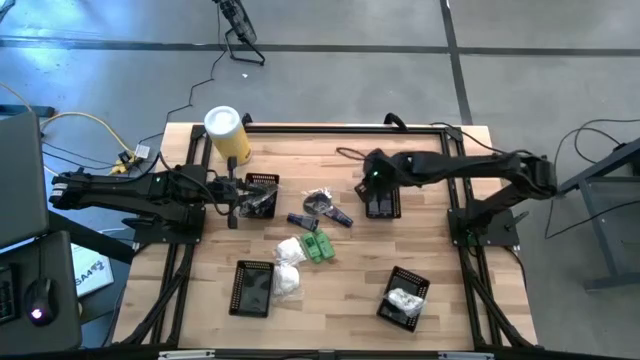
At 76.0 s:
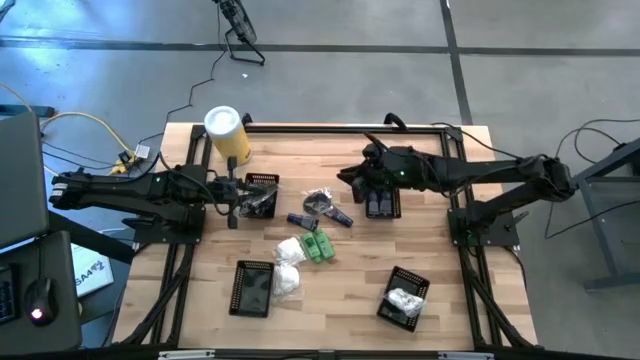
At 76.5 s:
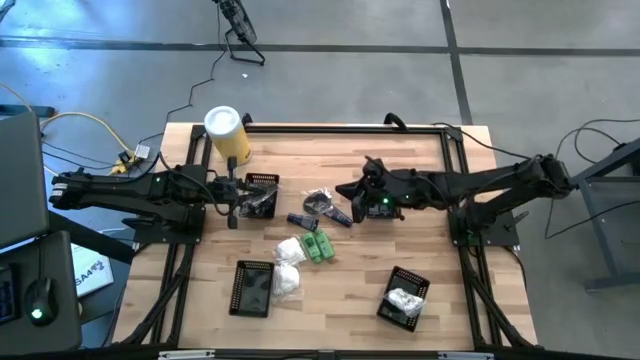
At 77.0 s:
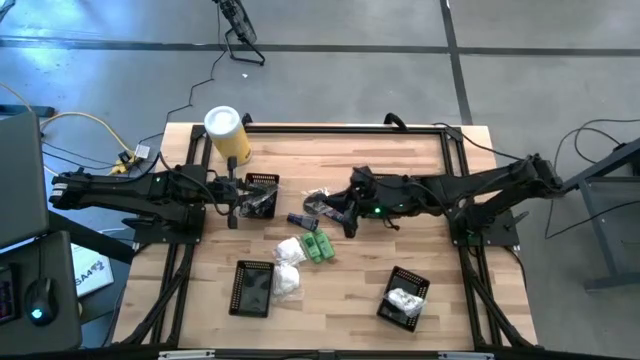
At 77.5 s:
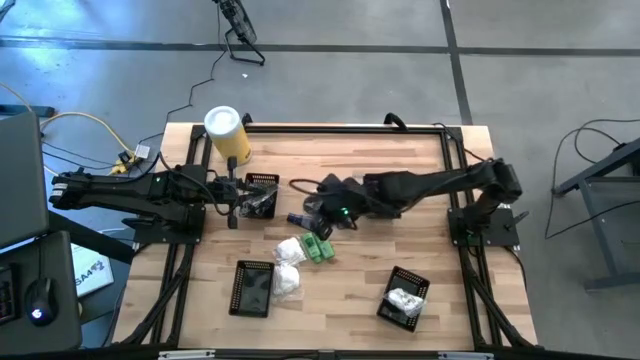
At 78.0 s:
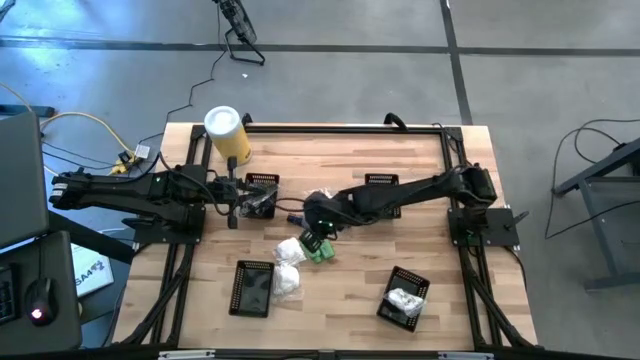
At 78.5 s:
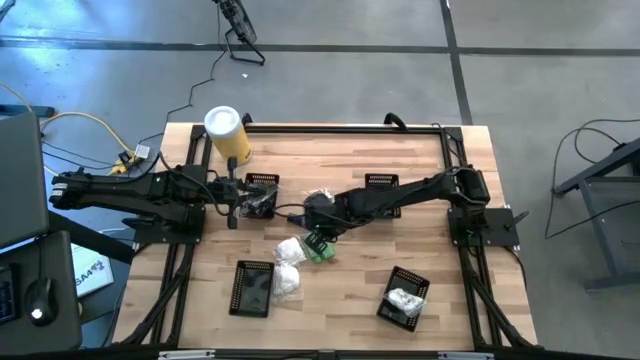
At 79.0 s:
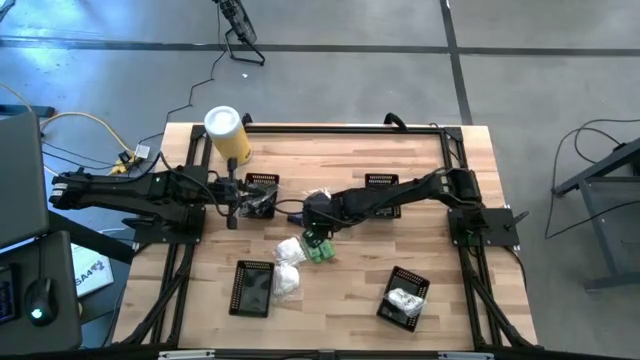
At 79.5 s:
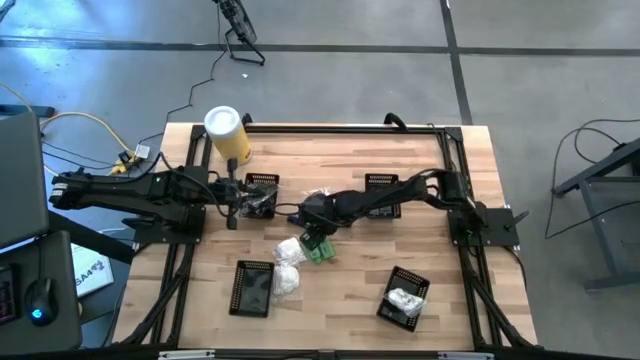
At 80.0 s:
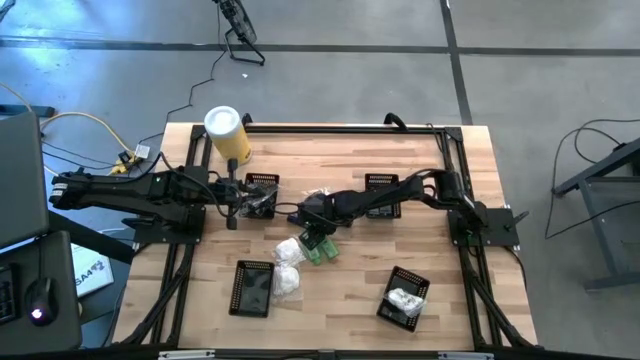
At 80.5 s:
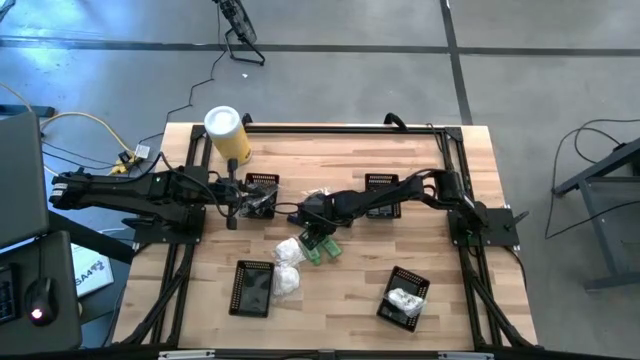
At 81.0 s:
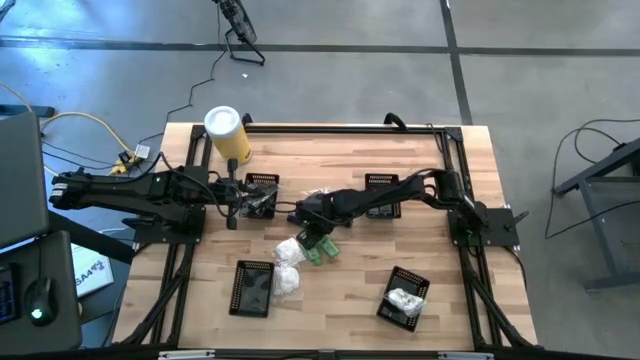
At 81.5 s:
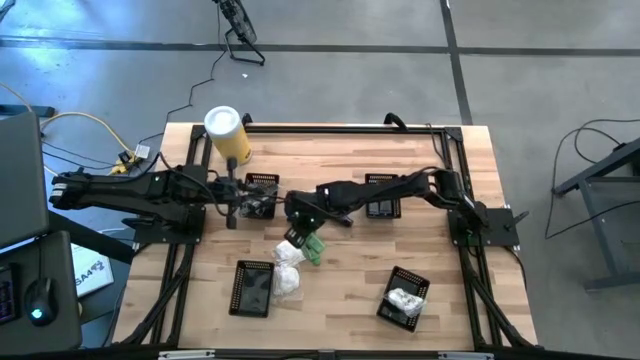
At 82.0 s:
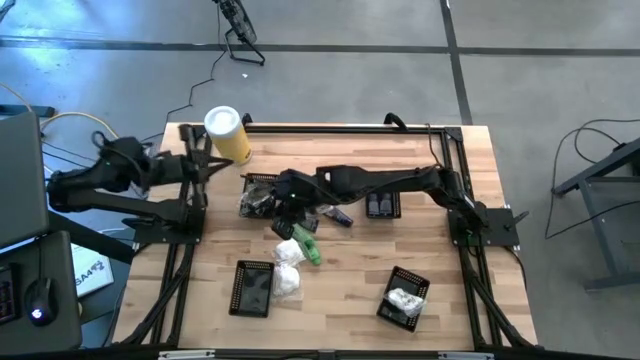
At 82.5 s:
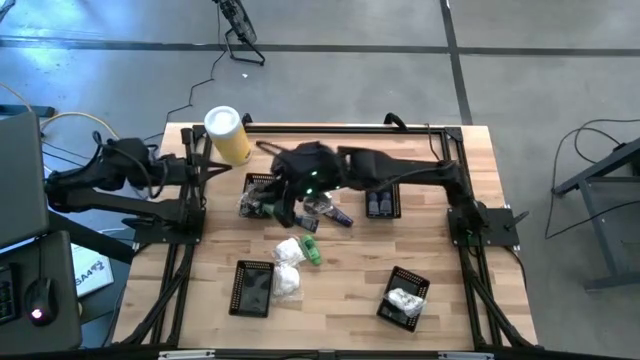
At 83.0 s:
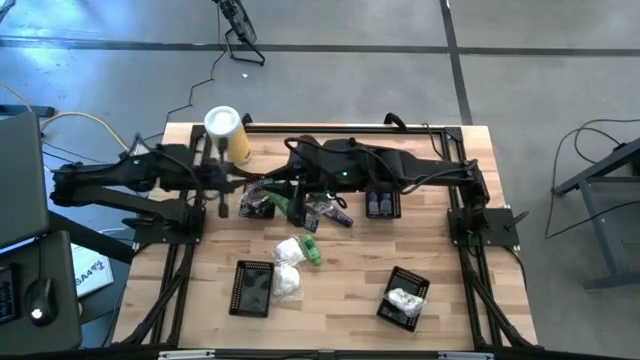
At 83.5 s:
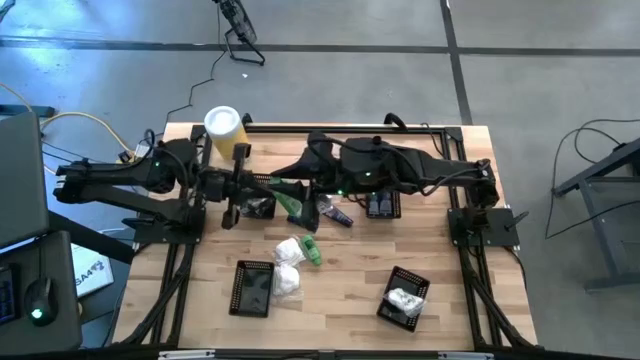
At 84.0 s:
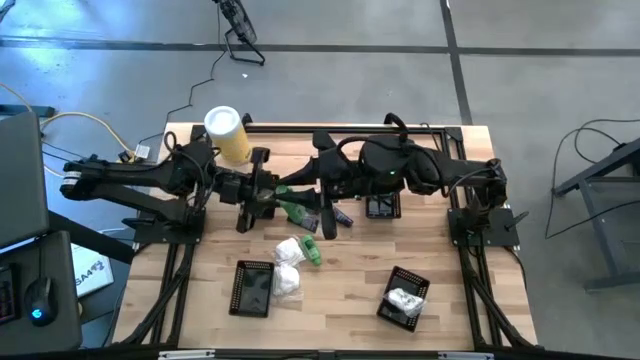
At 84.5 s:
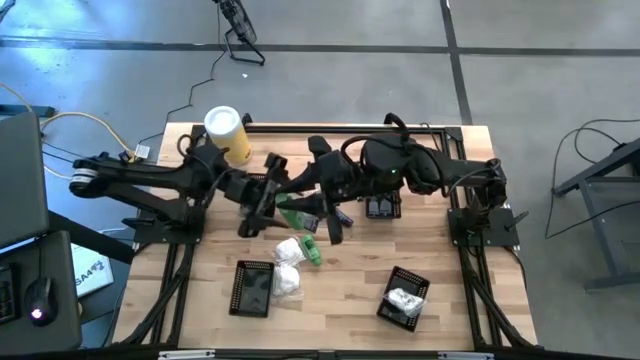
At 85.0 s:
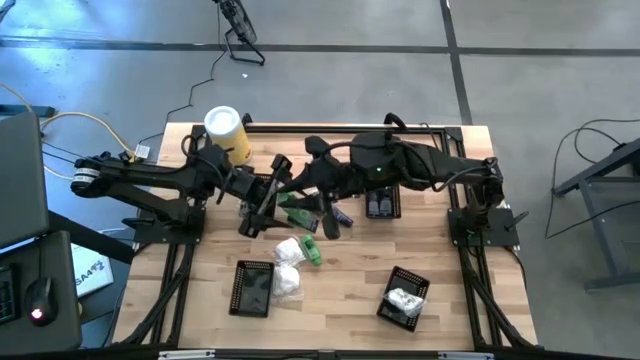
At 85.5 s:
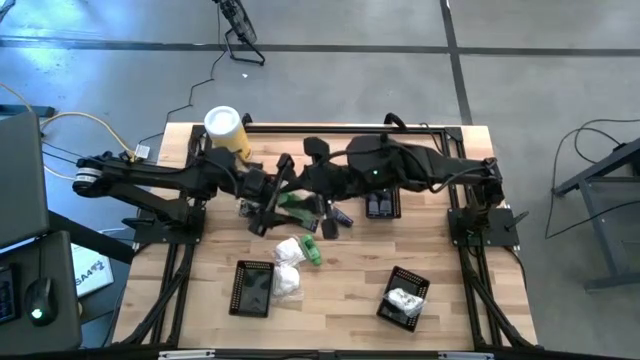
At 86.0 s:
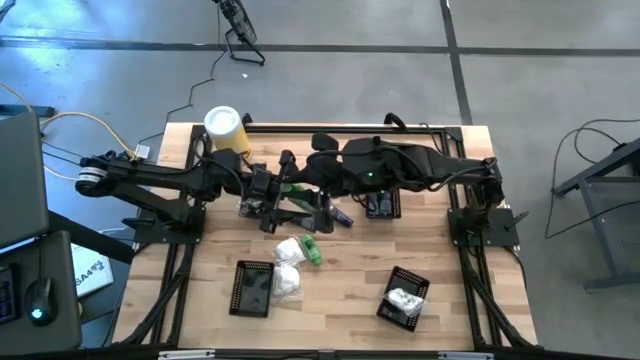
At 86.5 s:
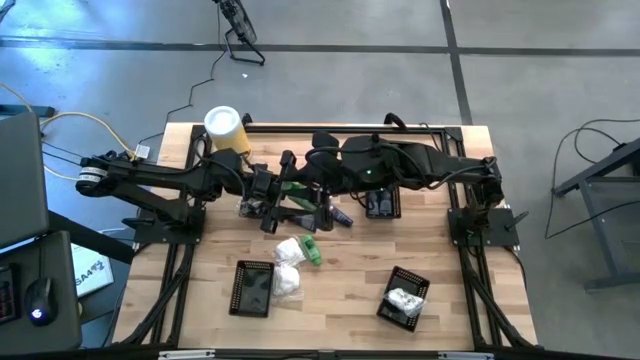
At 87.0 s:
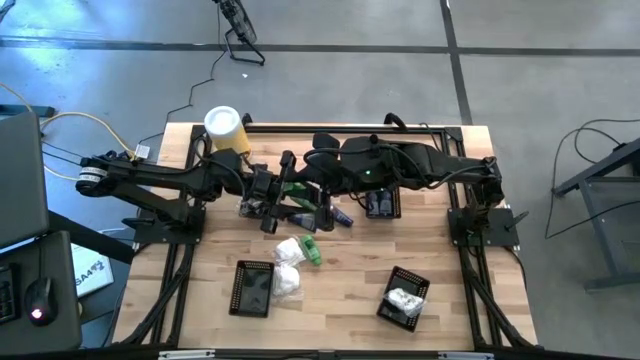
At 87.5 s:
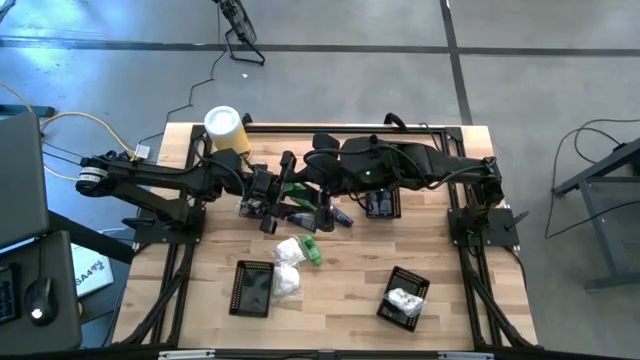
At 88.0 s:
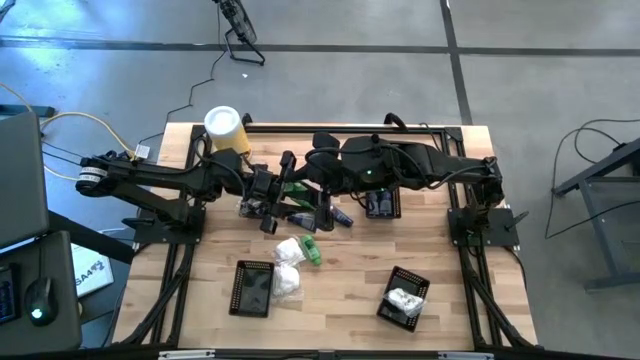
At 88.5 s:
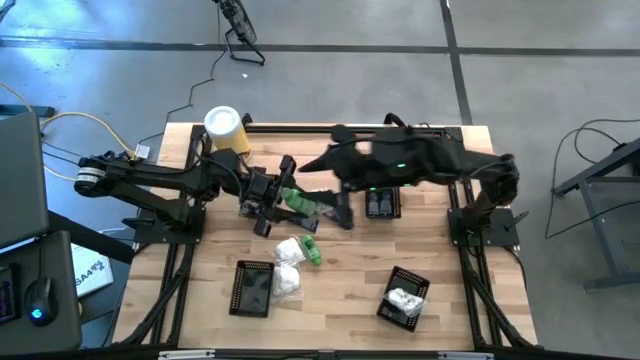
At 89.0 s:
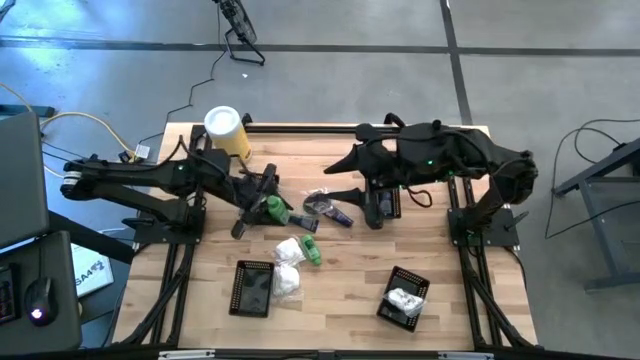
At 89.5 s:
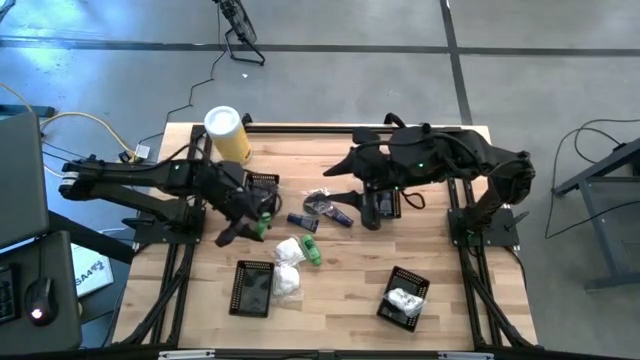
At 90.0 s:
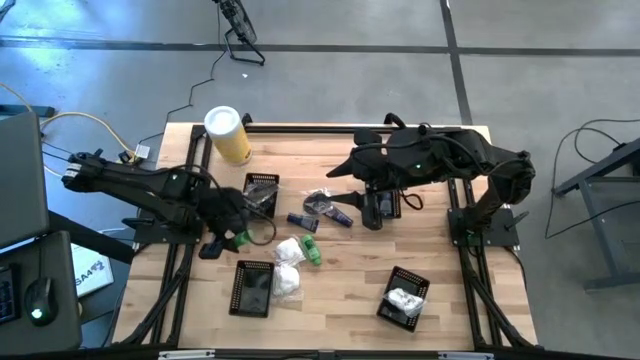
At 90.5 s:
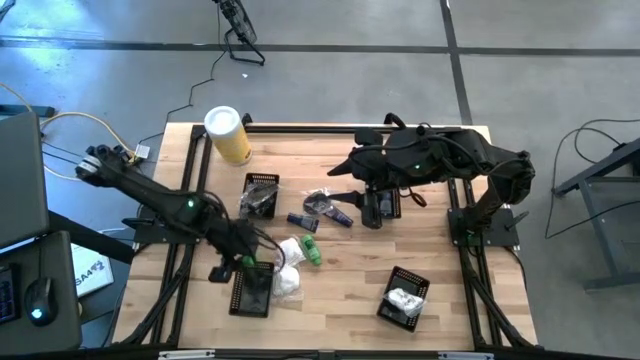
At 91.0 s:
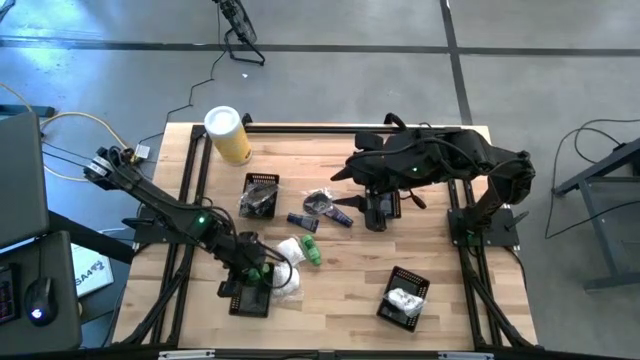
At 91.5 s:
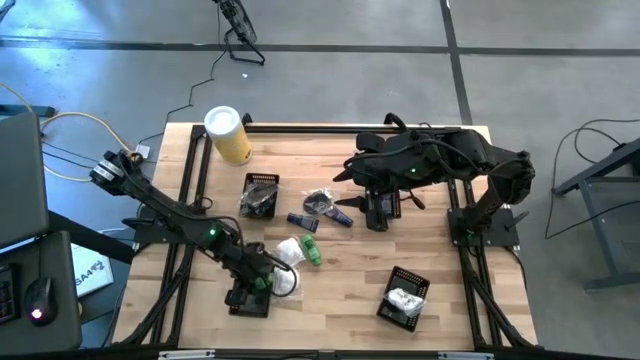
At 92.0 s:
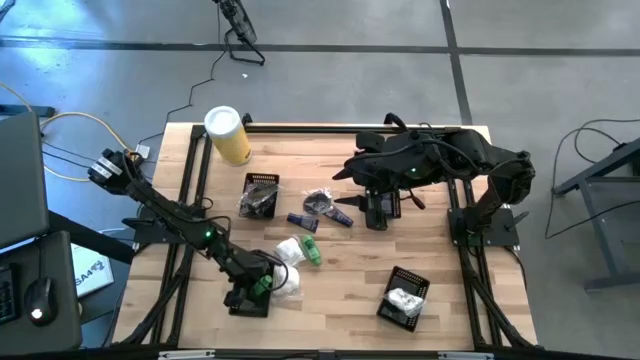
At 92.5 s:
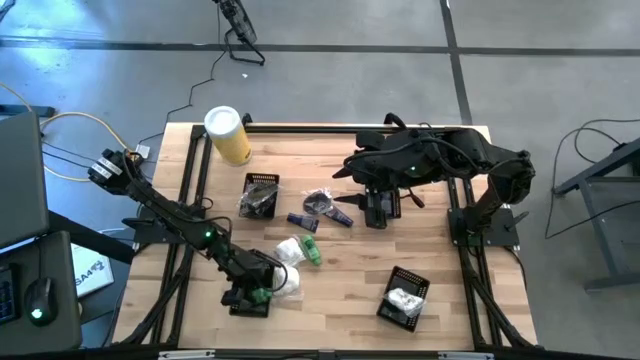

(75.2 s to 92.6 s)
Task: Pick & Place Travel size toiletries
Put the green shampoo into the bottom left black basket

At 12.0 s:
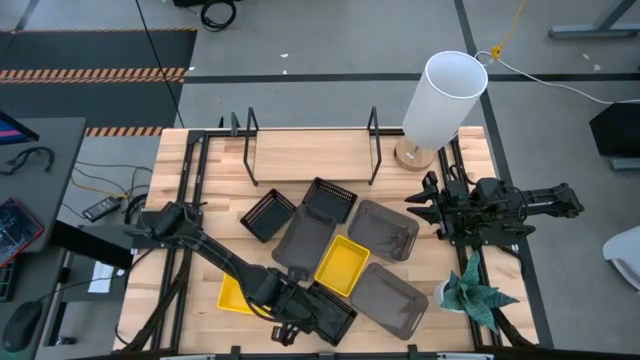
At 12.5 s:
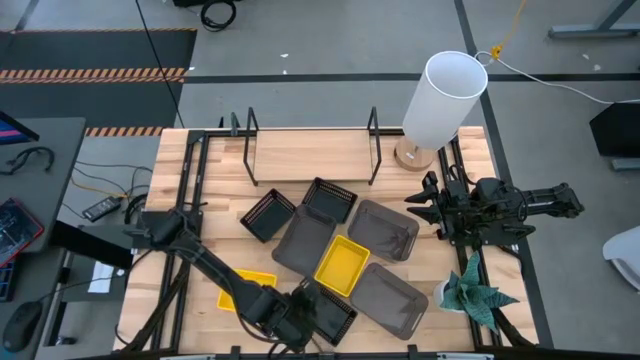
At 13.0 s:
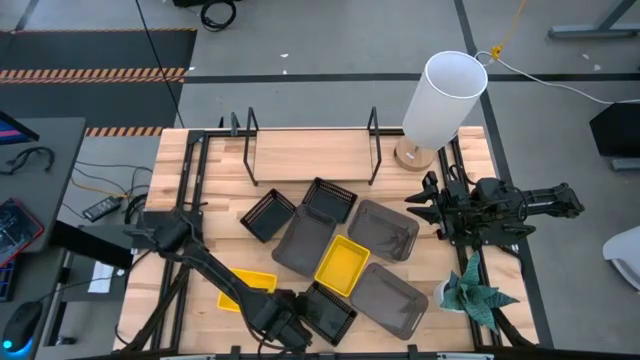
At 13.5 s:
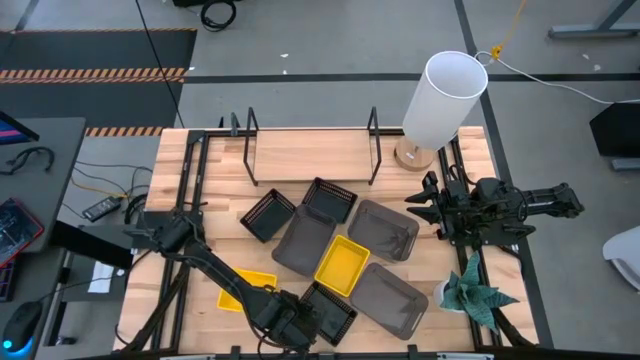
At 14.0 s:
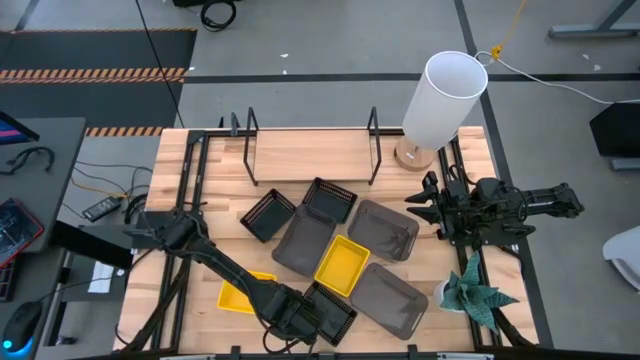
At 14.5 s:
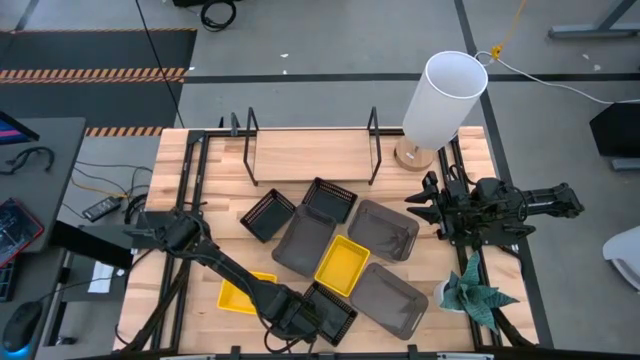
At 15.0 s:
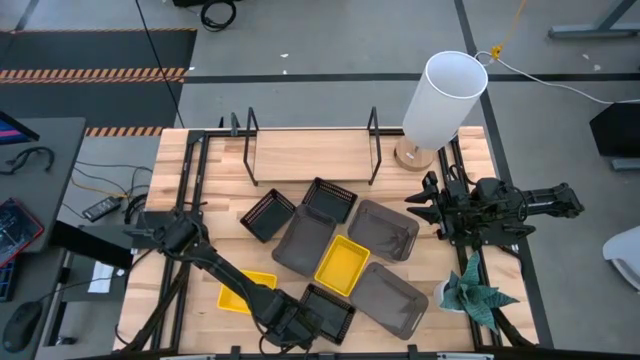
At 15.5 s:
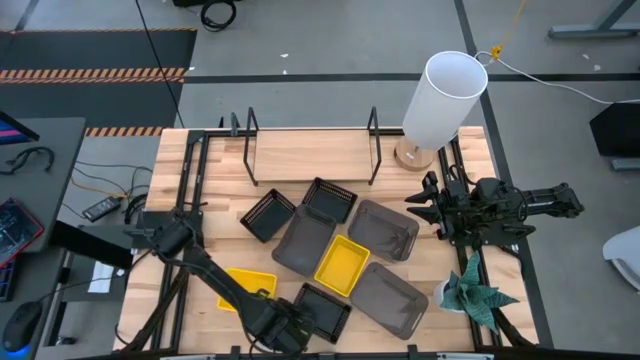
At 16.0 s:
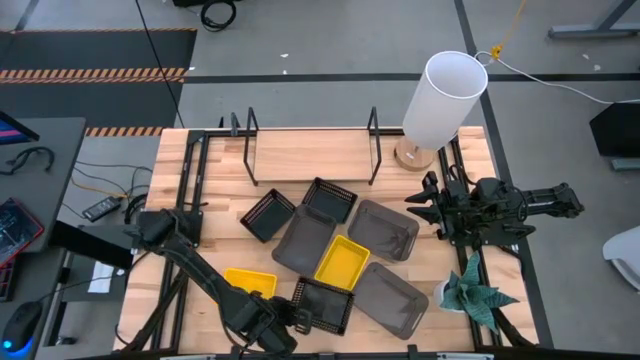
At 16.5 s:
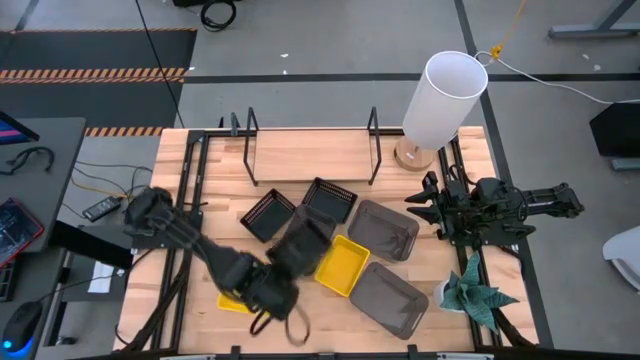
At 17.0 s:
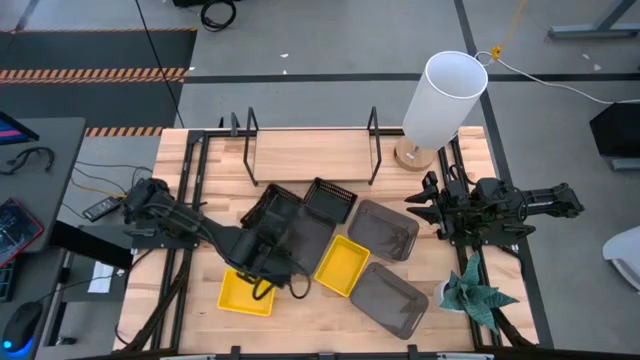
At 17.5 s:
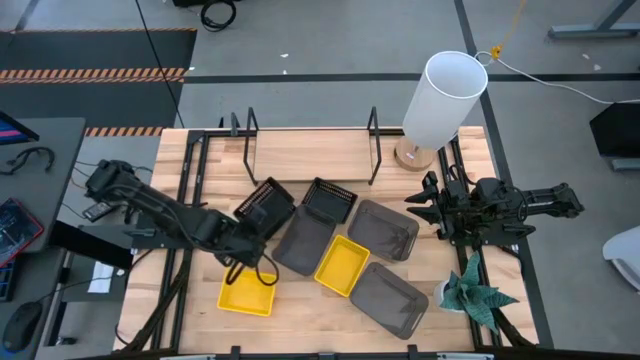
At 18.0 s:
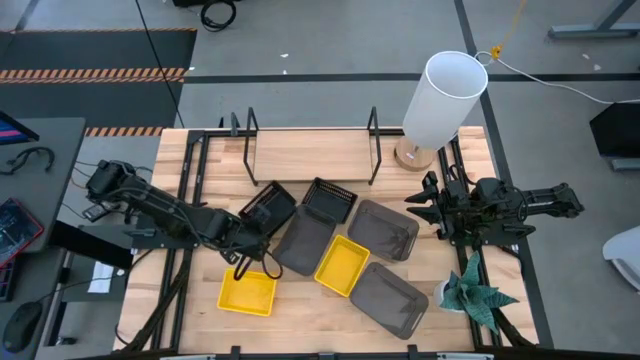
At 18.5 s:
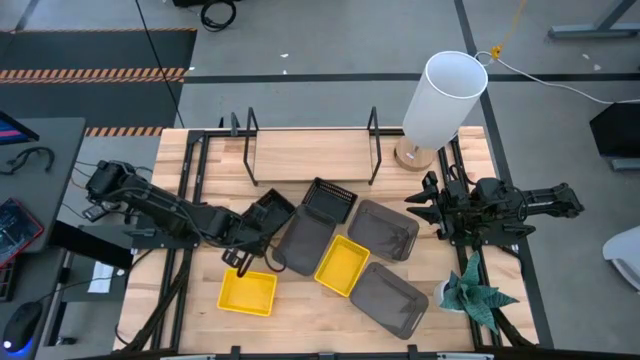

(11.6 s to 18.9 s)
Task: Stack baskets on shelf by color
Stack the bottom black bin on top of the top left black bin
